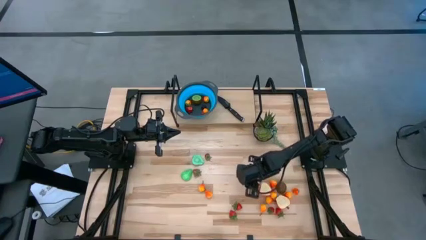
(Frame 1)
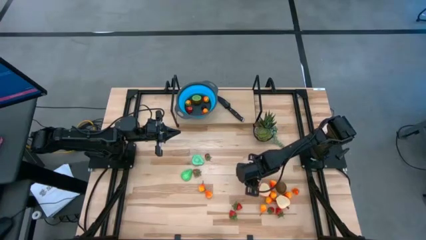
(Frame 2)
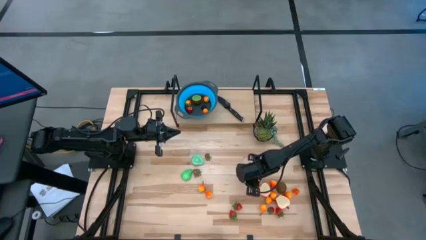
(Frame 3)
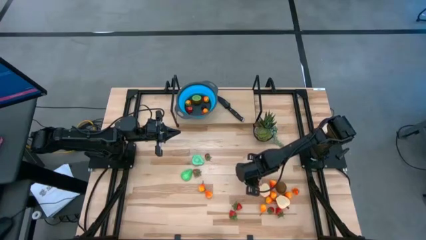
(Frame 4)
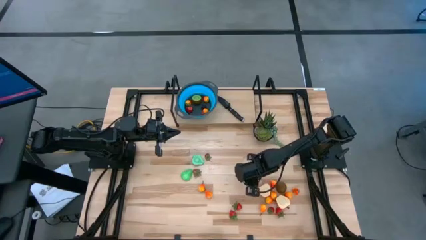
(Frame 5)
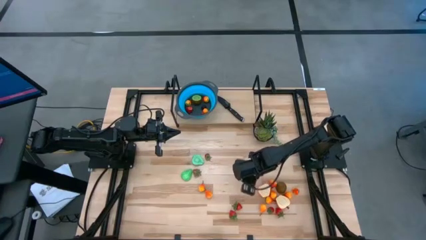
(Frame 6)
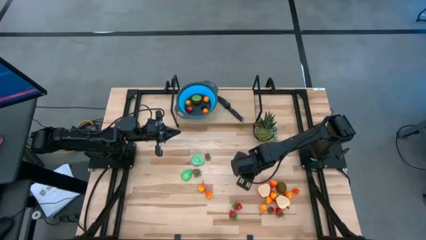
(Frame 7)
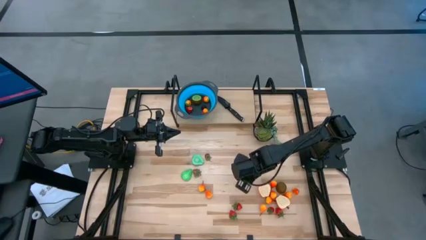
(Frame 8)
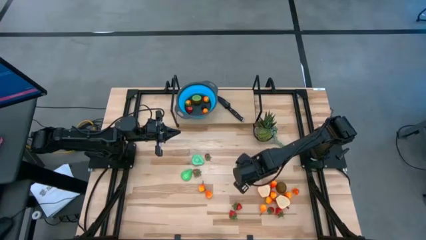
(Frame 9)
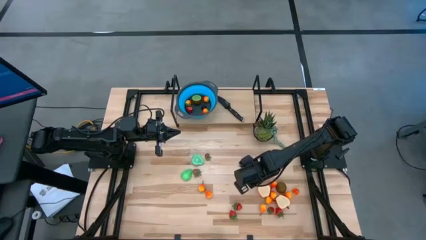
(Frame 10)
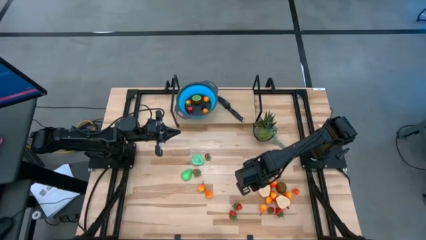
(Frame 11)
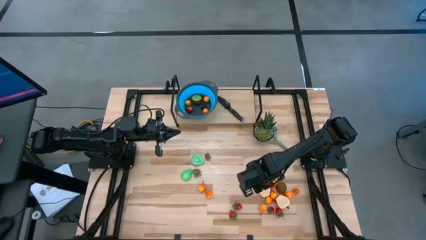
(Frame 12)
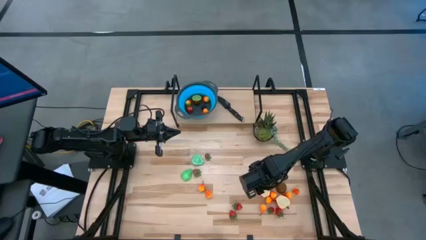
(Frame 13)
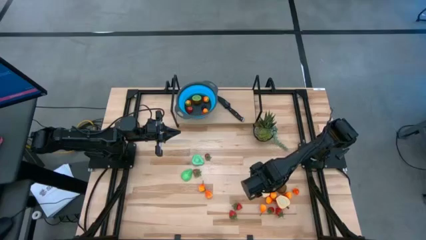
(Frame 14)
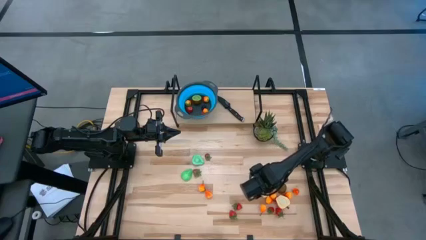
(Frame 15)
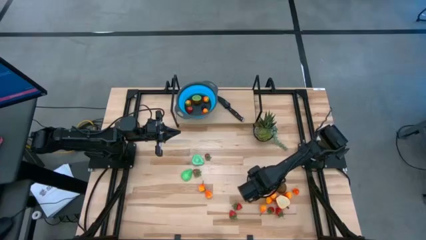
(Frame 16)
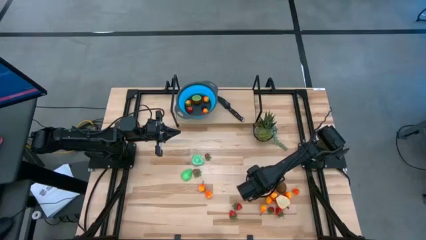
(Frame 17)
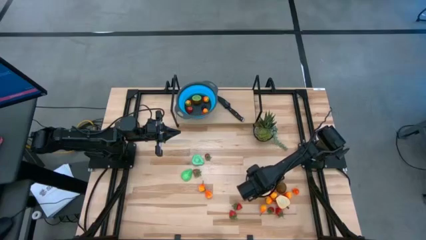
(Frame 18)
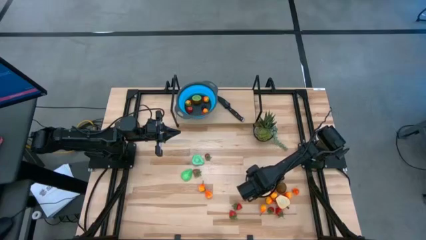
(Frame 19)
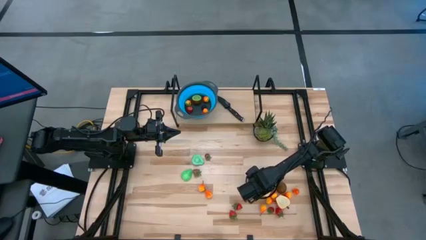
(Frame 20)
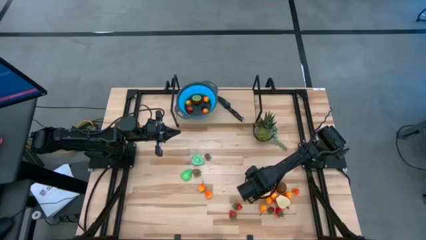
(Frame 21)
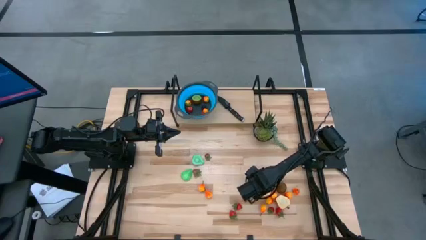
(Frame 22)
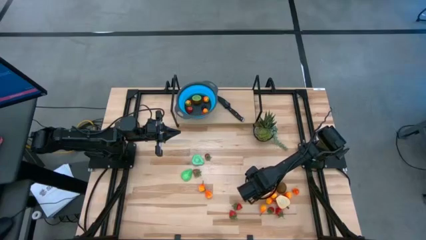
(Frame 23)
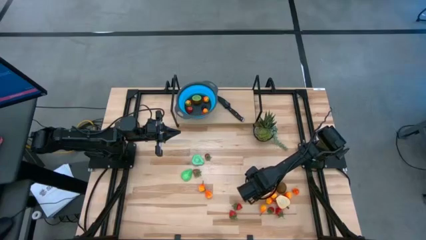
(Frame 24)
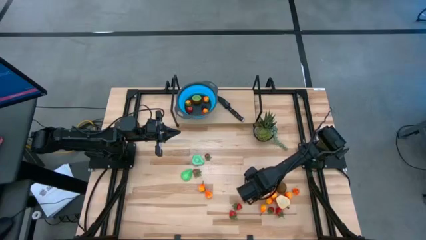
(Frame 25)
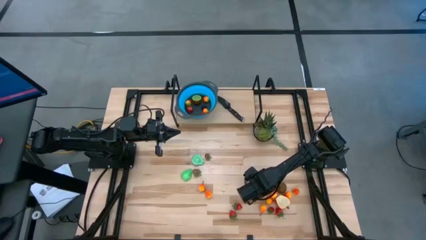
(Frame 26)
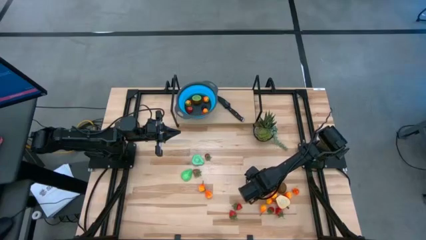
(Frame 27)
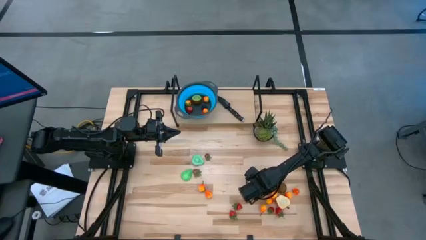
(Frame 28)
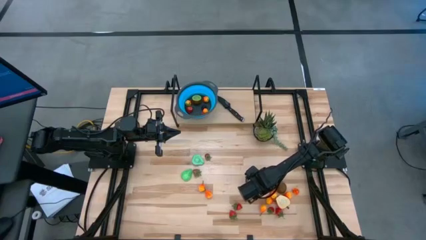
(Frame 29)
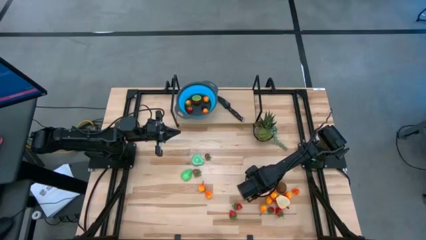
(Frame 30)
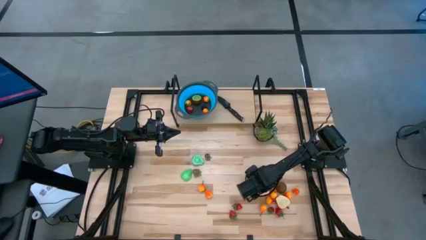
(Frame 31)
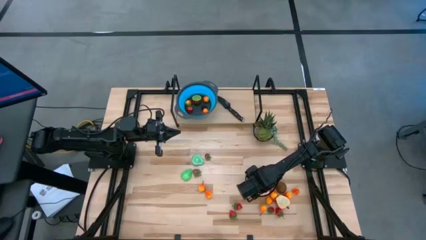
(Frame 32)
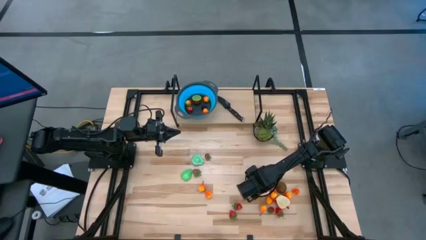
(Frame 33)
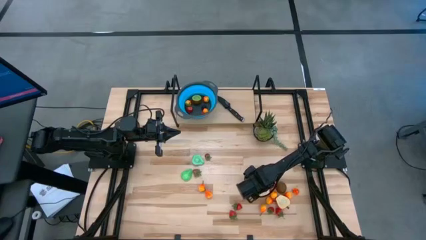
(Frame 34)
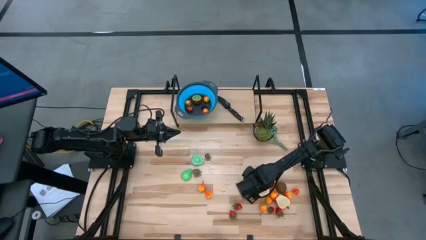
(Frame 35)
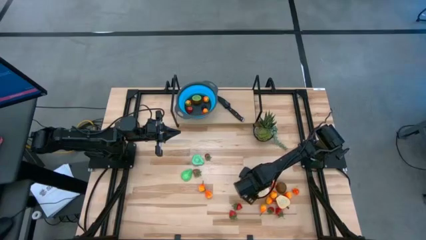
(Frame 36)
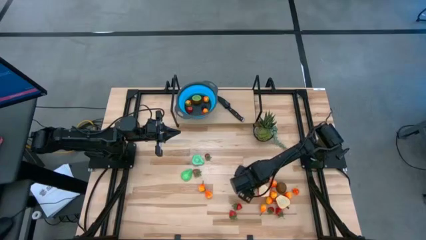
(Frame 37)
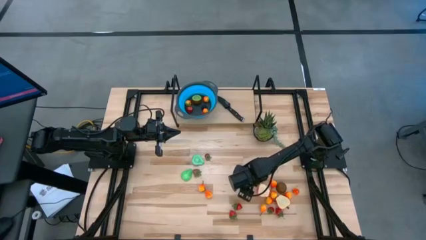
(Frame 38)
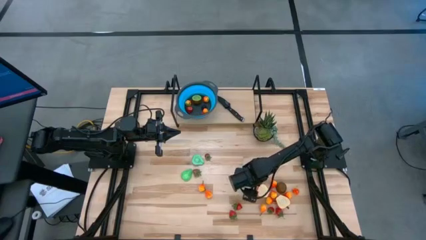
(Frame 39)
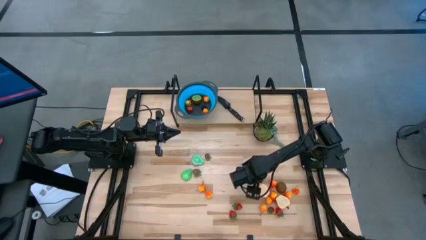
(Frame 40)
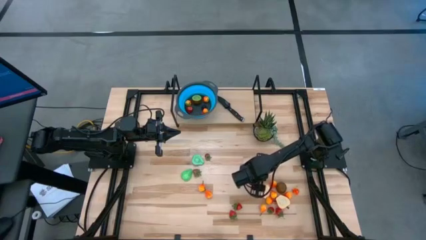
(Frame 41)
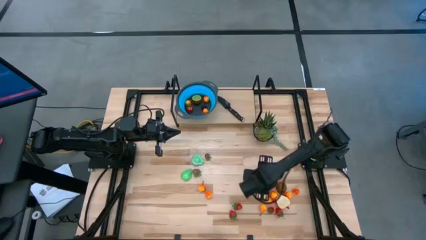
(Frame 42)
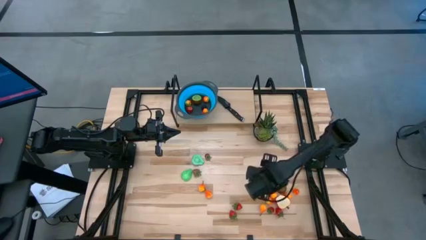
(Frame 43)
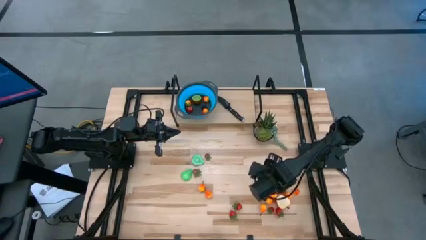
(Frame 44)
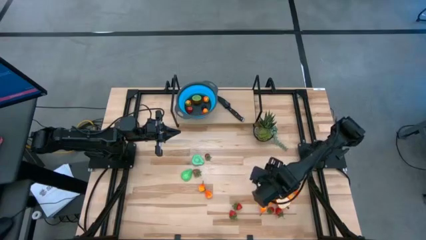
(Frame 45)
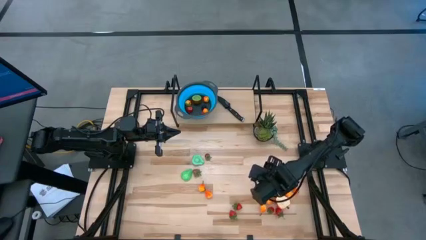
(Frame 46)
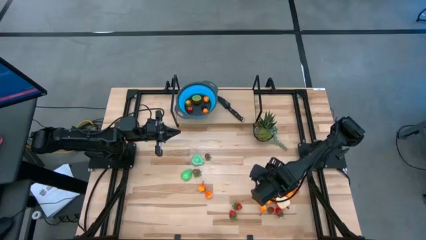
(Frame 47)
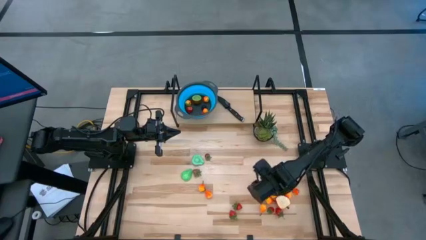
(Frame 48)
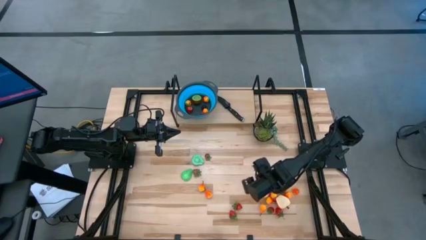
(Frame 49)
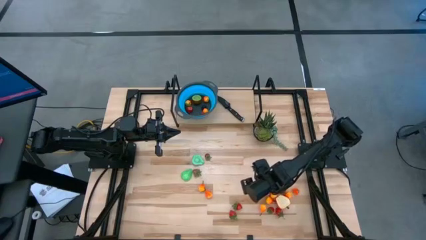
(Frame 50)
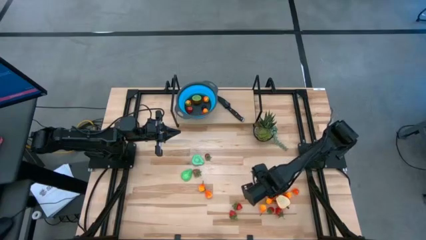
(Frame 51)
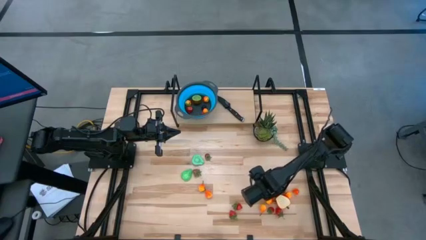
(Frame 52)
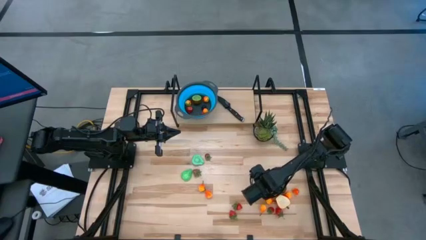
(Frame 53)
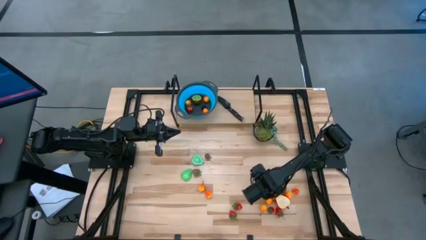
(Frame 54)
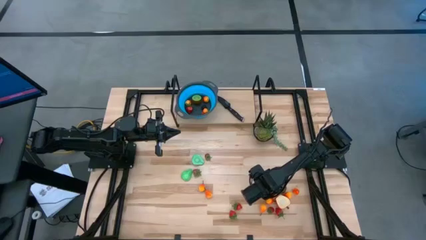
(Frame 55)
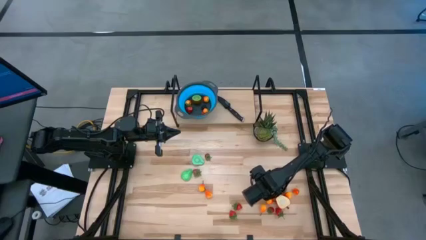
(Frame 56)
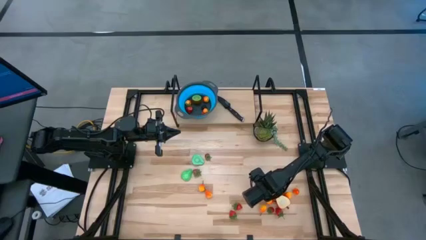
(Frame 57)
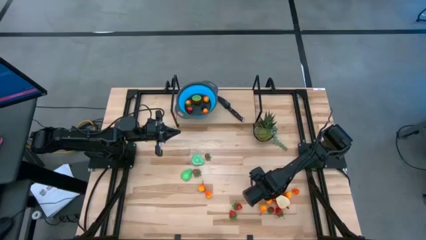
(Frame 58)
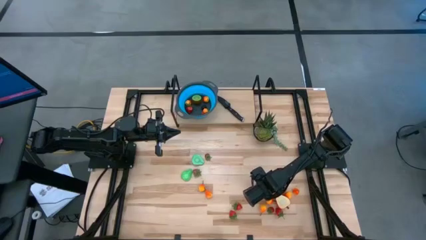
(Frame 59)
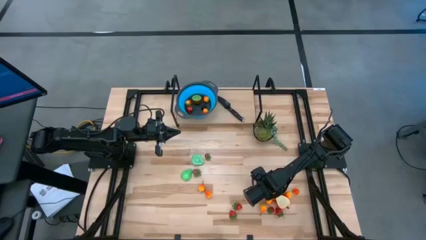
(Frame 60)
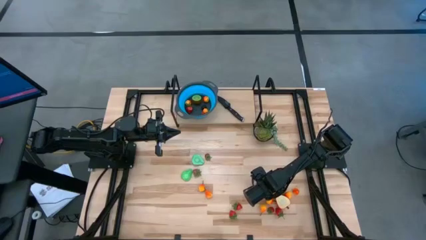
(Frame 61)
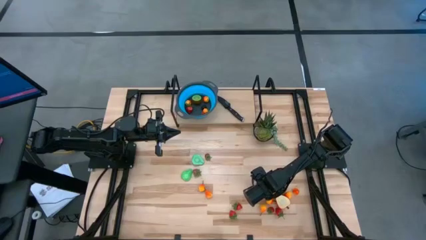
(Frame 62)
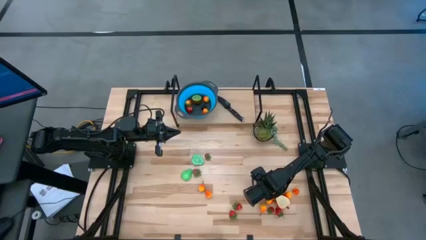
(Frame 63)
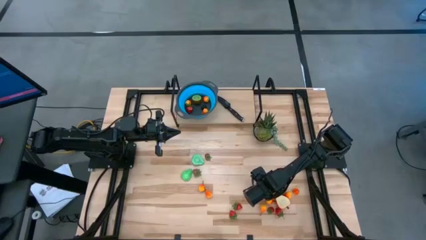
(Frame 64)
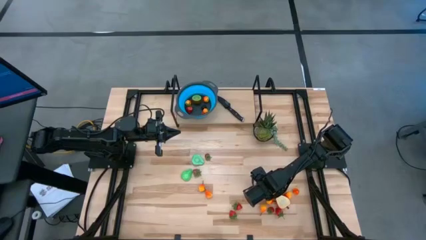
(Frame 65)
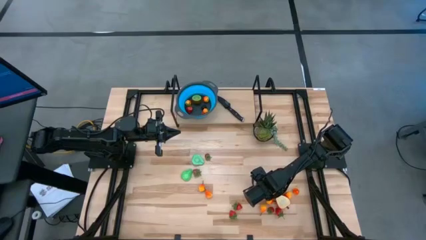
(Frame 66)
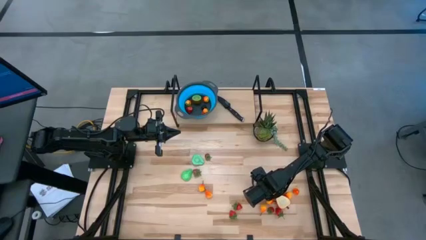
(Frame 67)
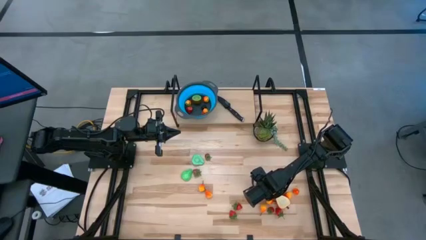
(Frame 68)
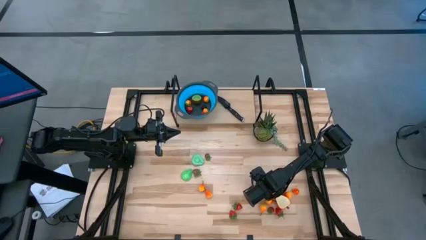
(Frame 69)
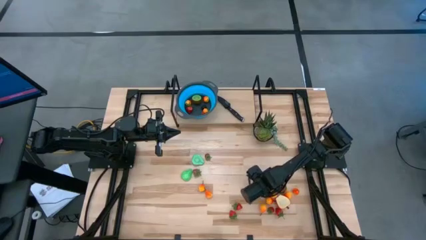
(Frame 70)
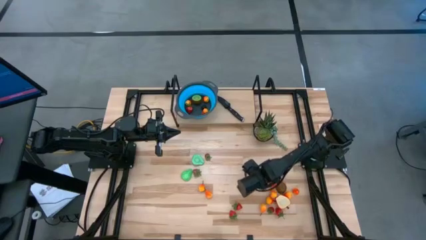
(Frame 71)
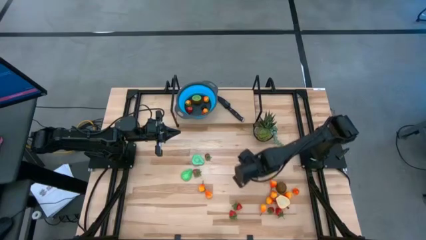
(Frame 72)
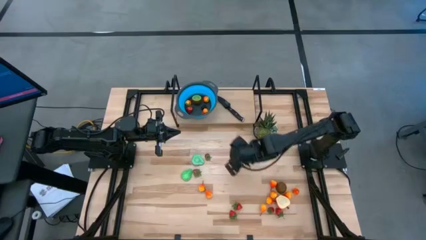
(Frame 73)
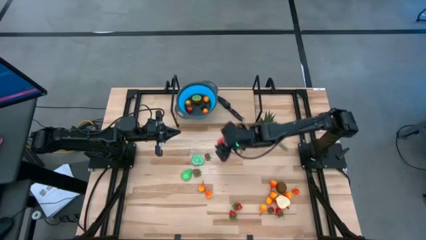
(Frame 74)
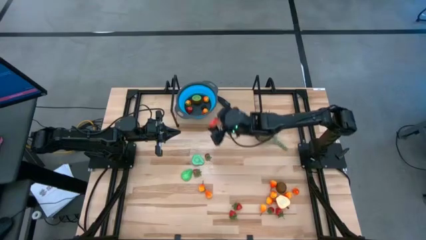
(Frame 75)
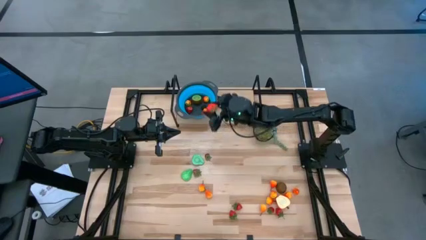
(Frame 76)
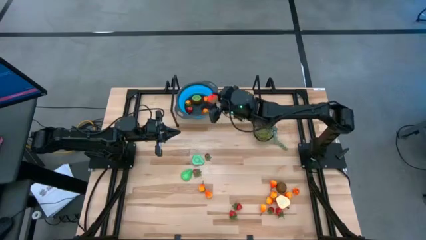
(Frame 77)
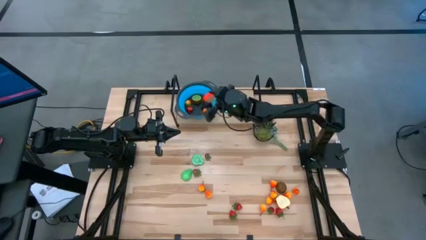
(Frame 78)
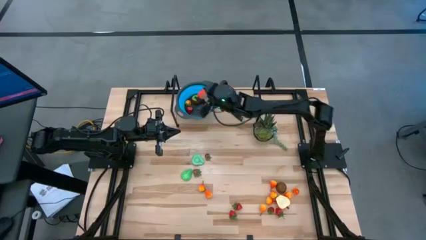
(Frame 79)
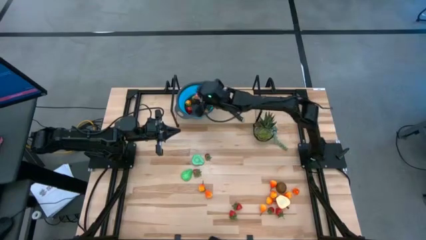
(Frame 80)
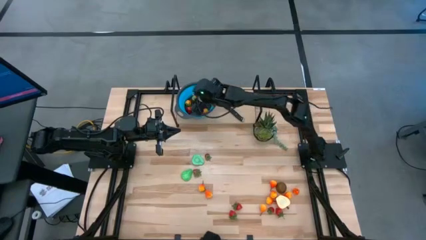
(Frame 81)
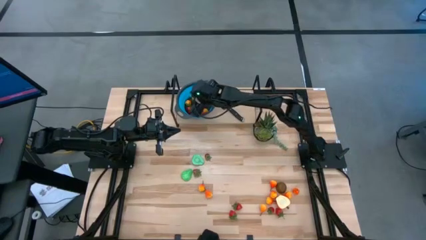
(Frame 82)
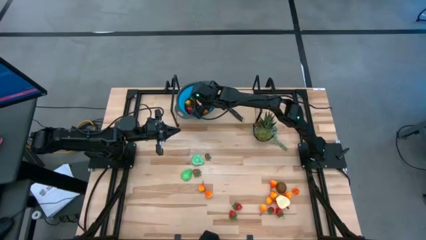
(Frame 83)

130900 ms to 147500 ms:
Task: Pick & Place Fruit
Put the apple into the basket

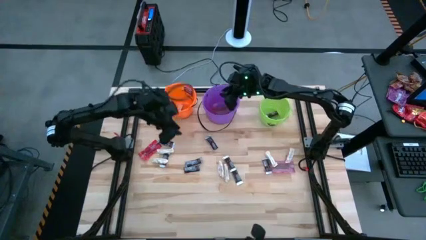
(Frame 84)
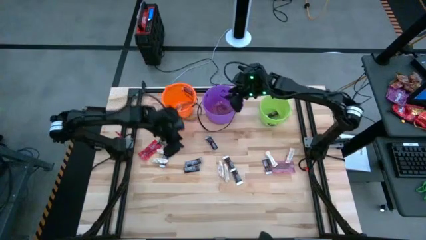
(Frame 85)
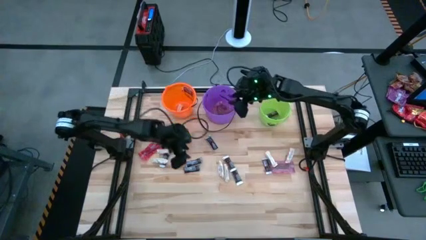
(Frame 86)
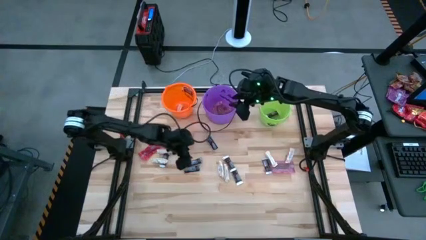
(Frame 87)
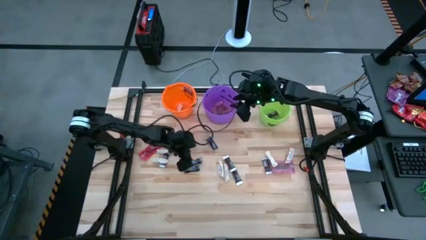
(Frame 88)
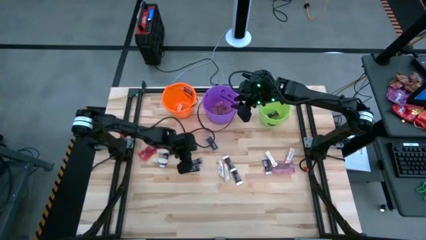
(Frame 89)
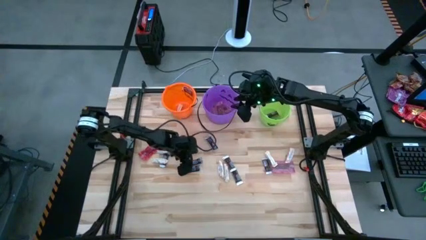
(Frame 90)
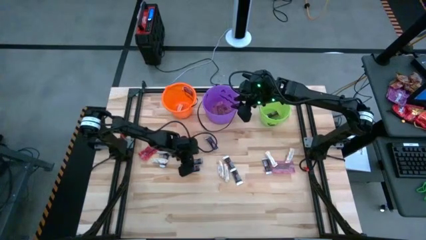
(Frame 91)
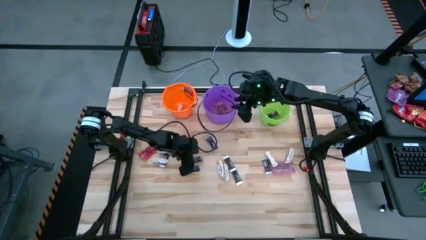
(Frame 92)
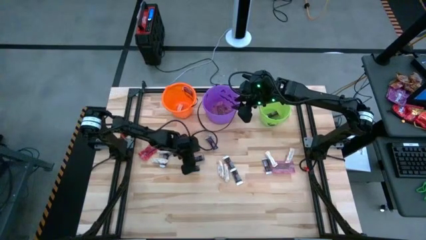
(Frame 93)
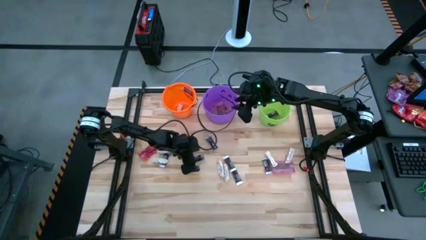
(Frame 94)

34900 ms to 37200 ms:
Task: Sort candy by brand, put in halloween buckets
Put the brown chocolate bar into the green bucket
